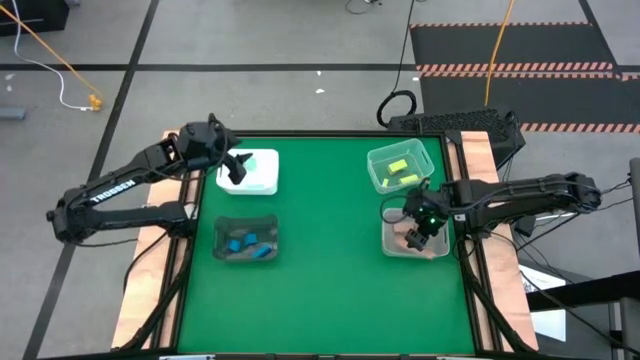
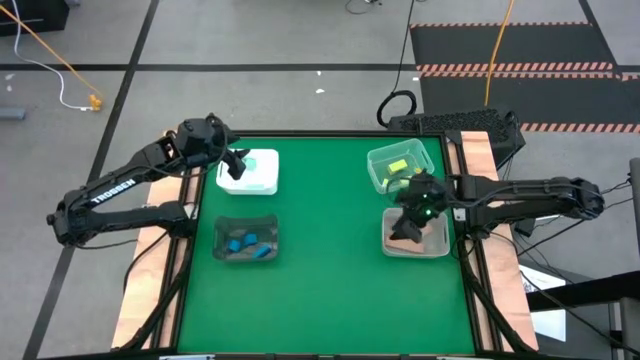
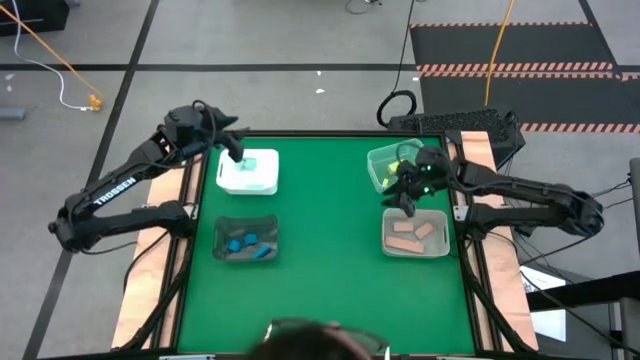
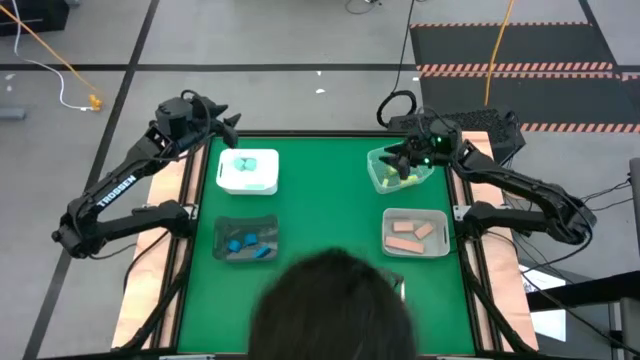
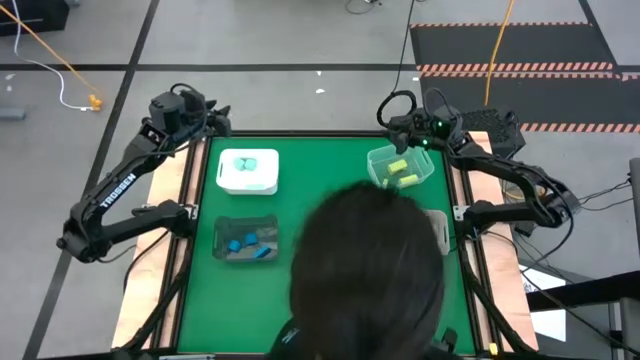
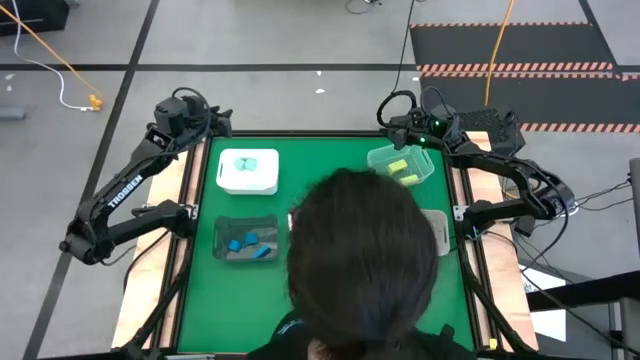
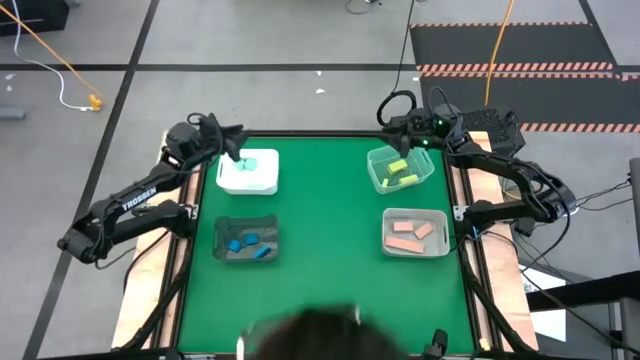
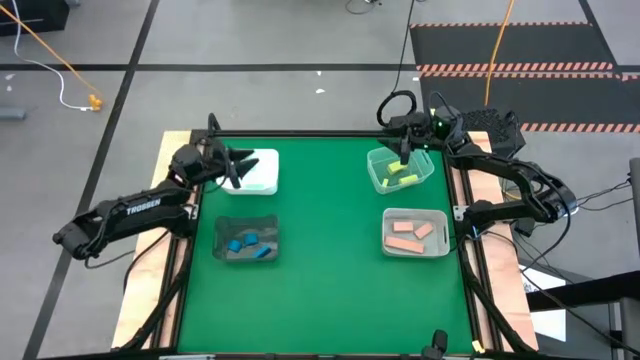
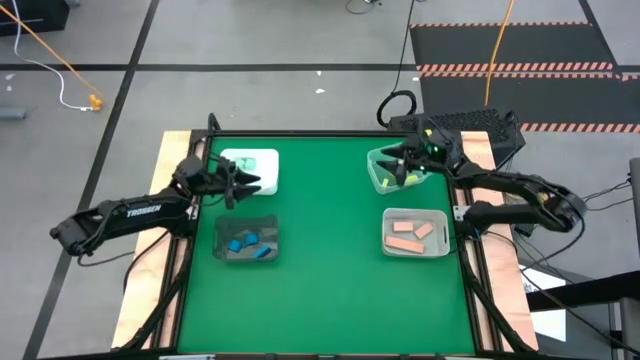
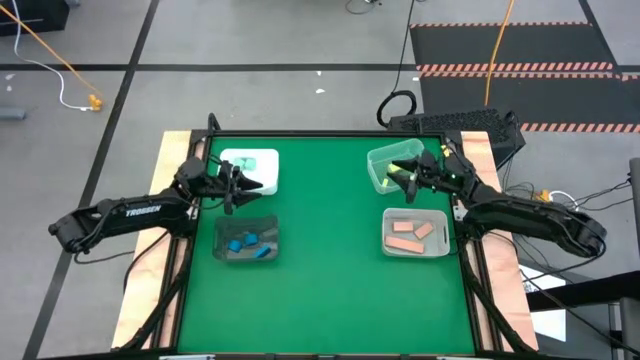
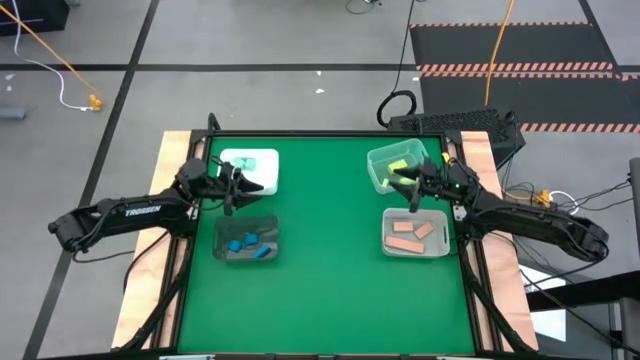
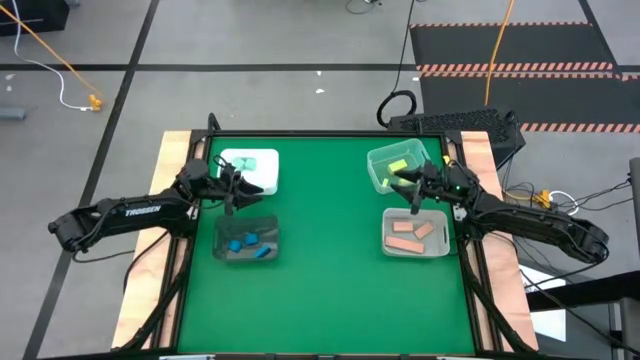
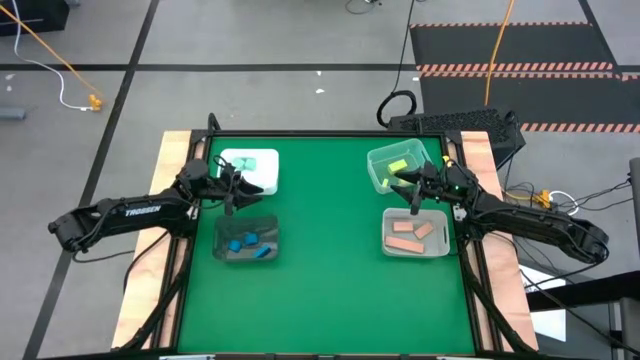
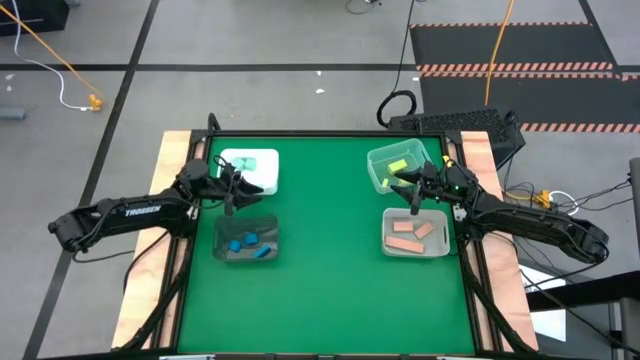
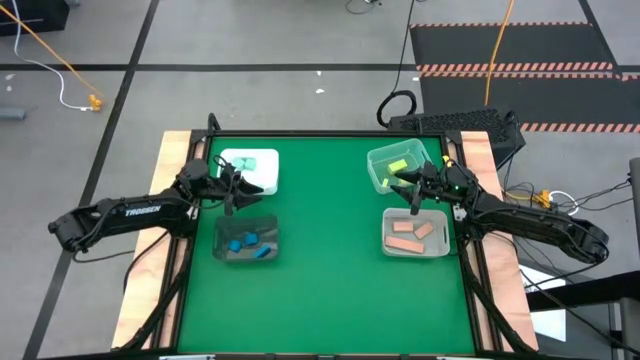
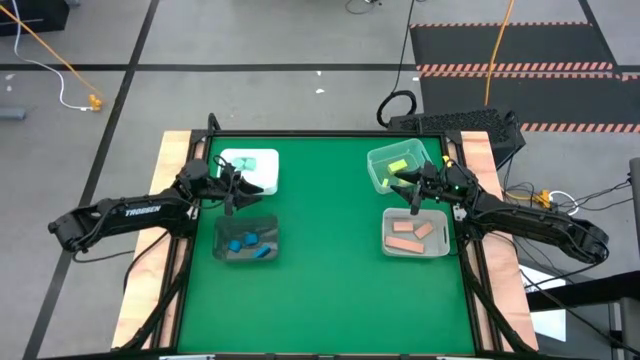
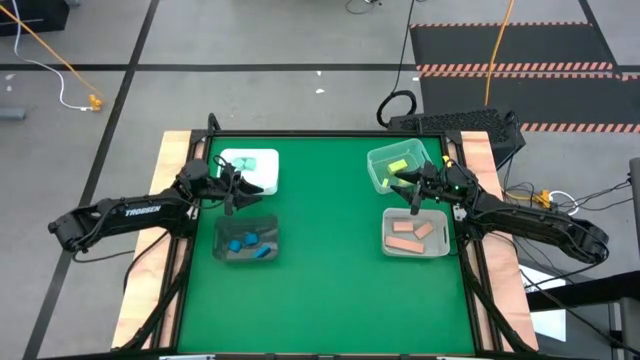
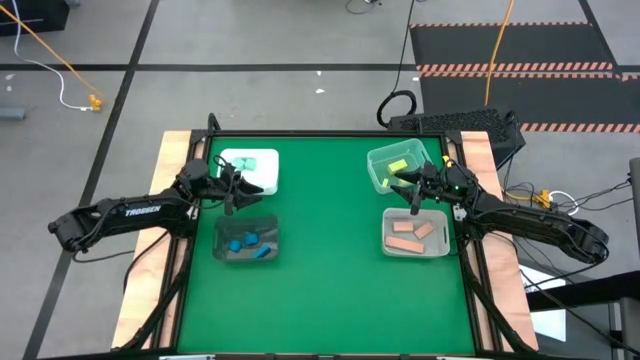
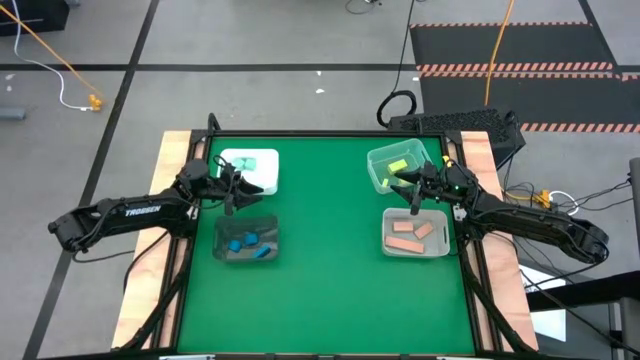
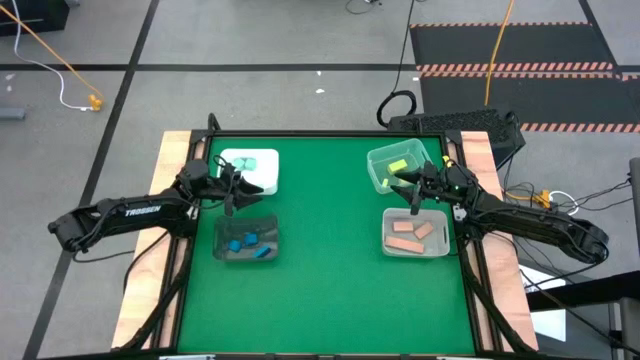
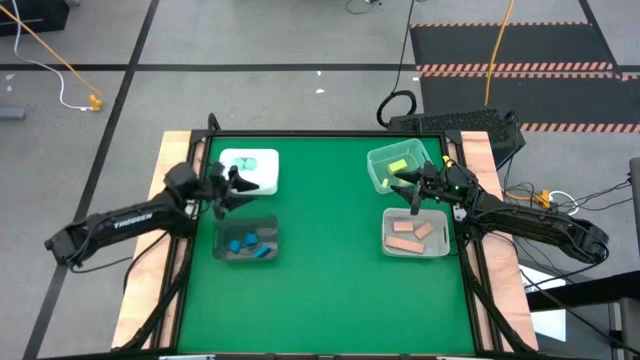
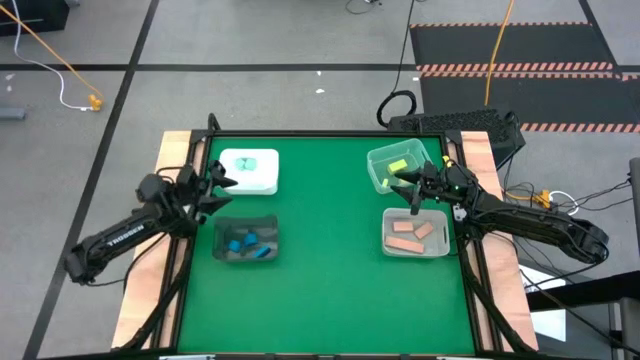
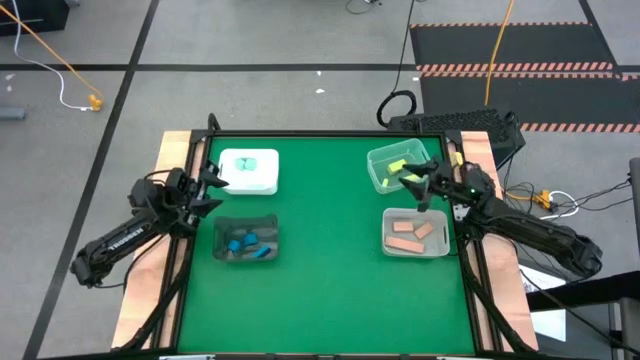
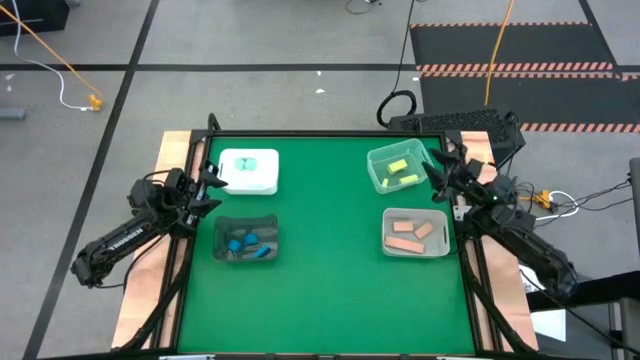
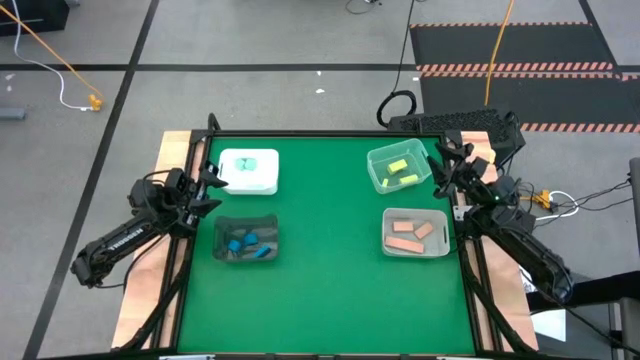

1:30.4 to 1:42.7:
Task: Sort & place blocks by color
Return to Home Position

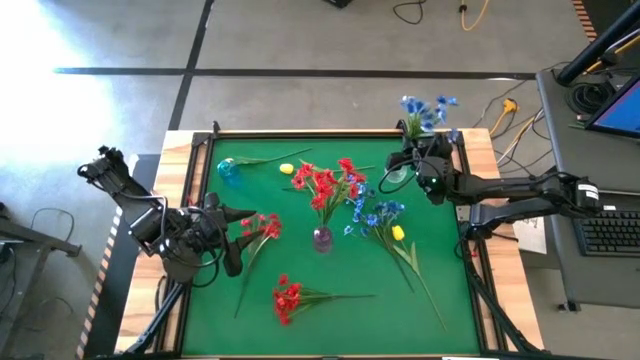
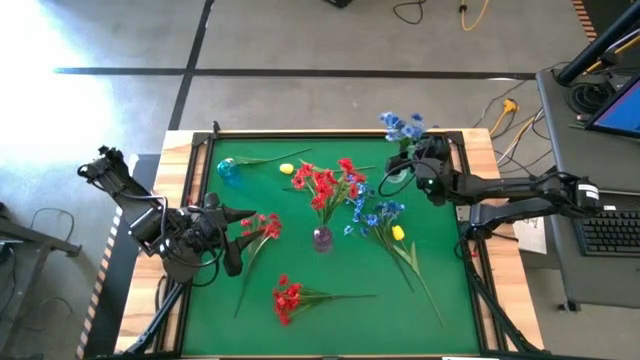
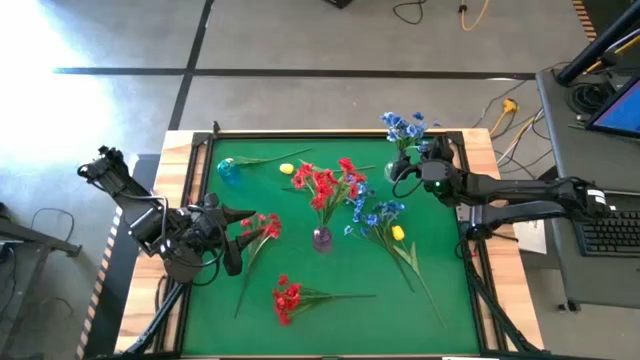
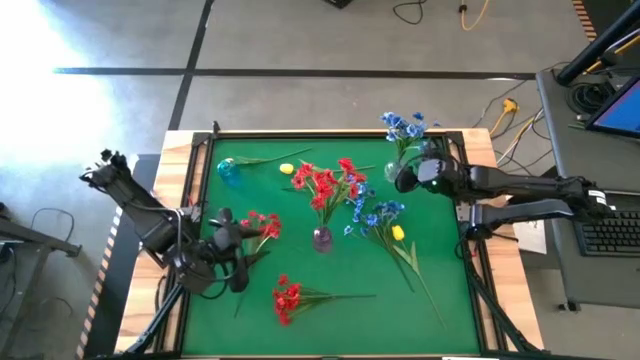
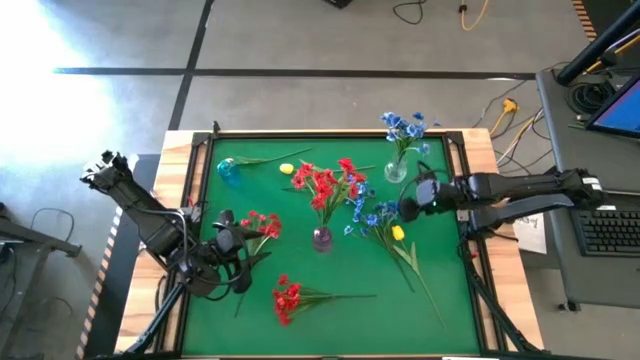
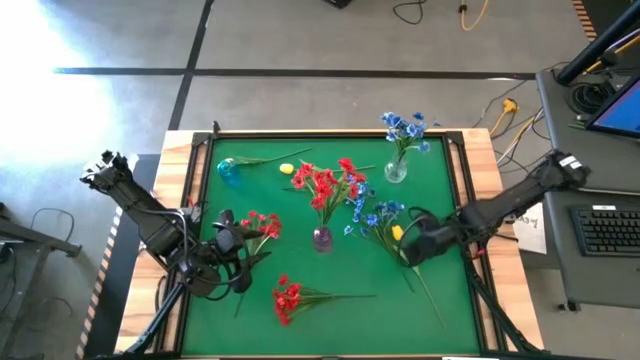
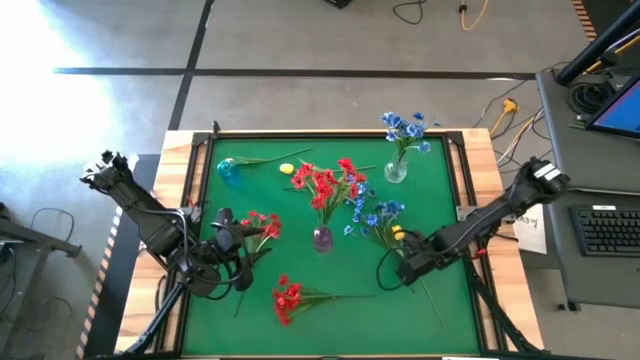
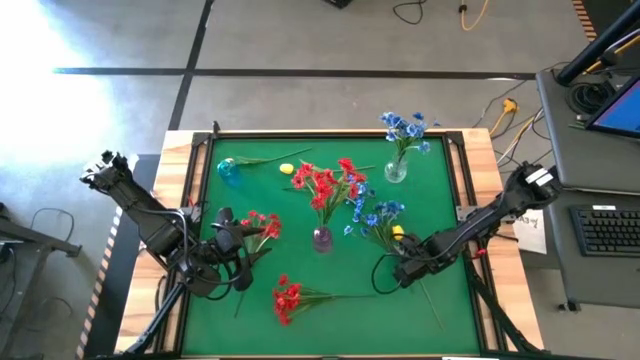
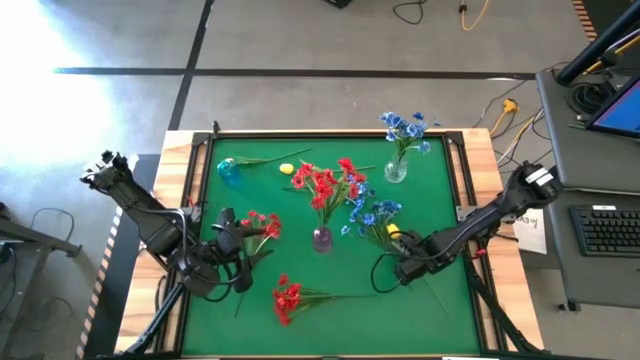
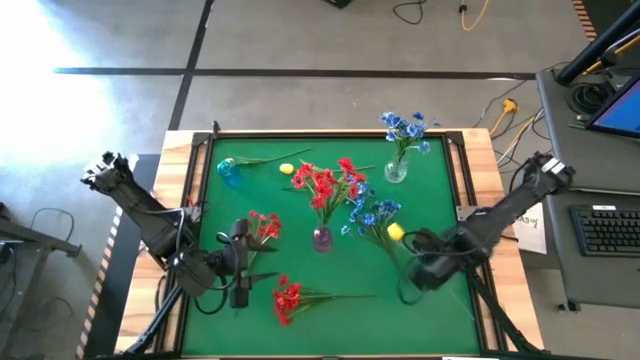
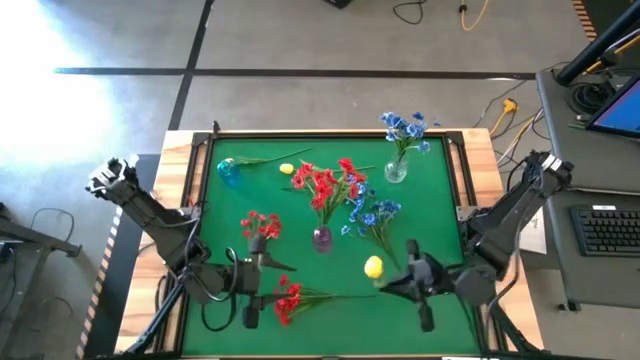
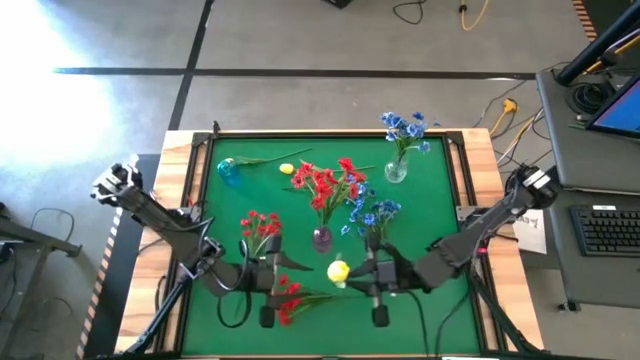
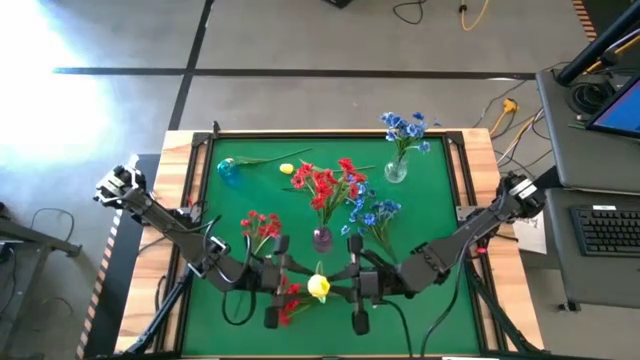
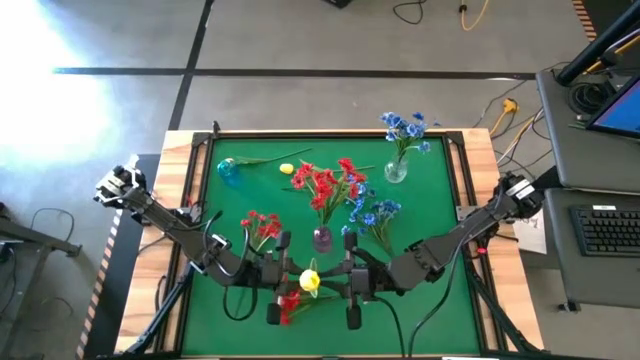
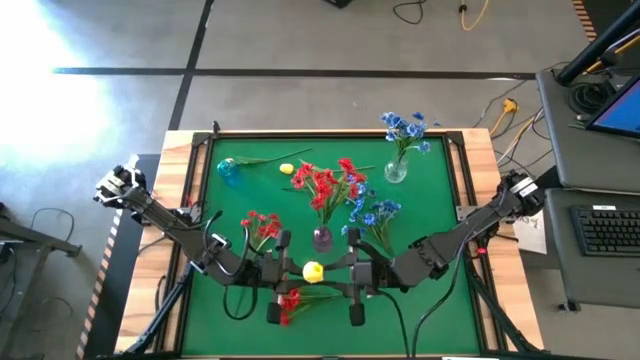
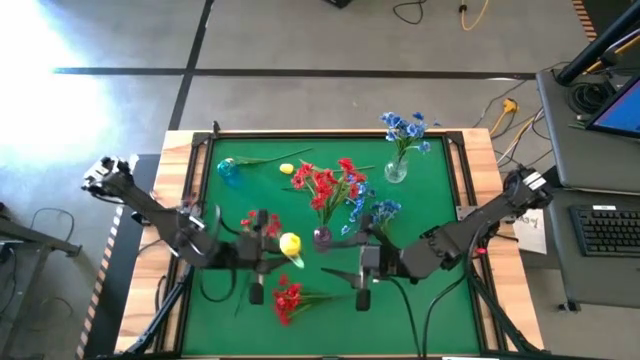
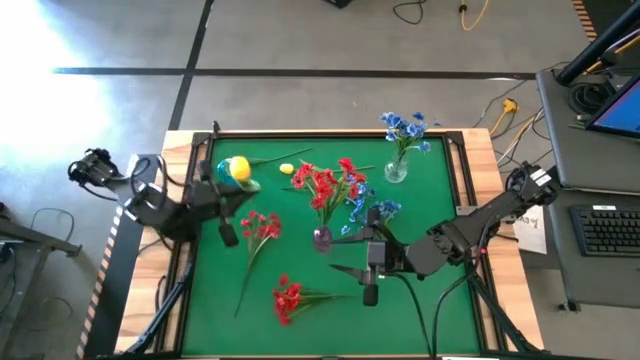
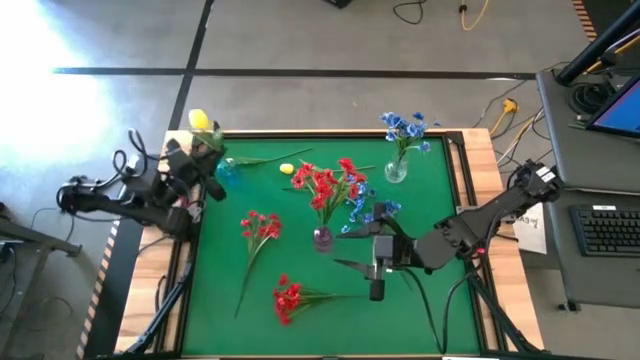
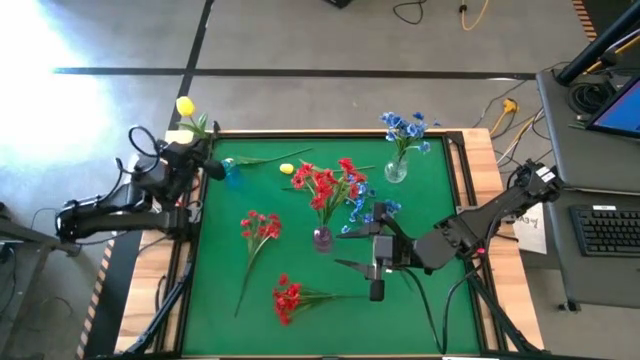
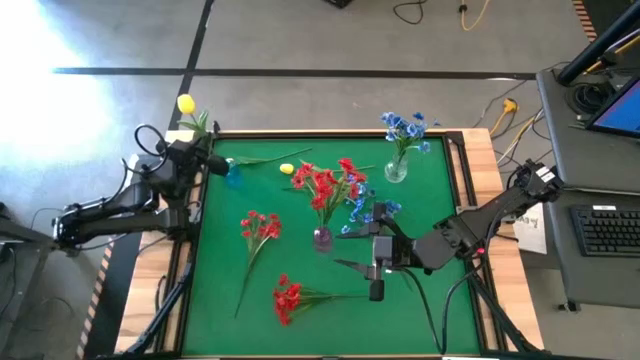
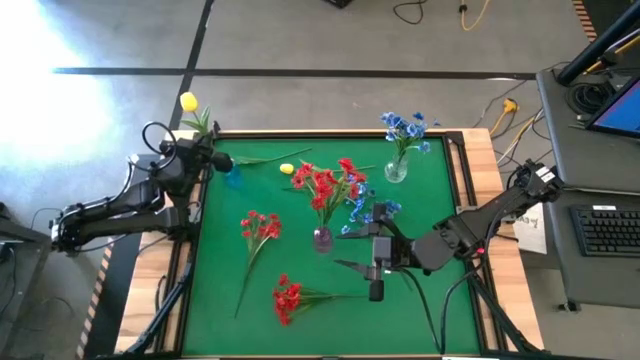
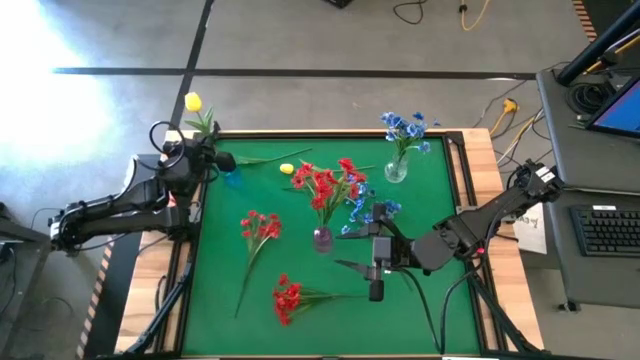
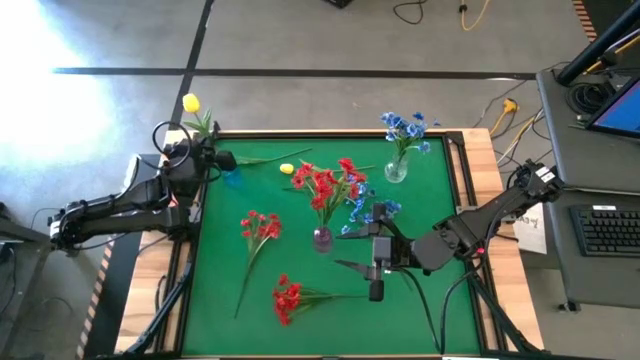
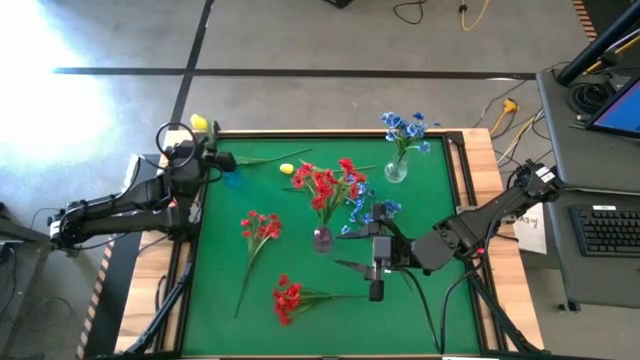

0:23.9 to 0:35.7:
Task: Sort flowers into vase by color
Put the bottom right yellow flower into the blue vase
